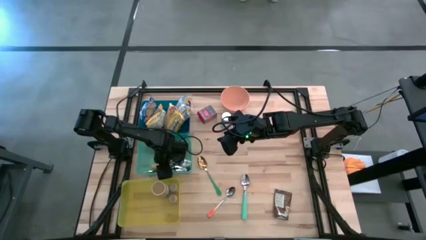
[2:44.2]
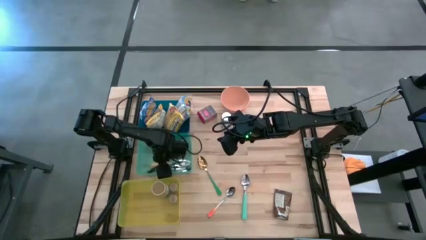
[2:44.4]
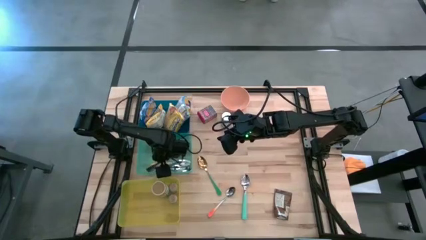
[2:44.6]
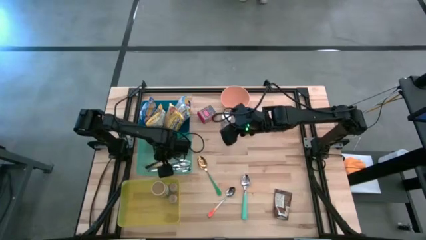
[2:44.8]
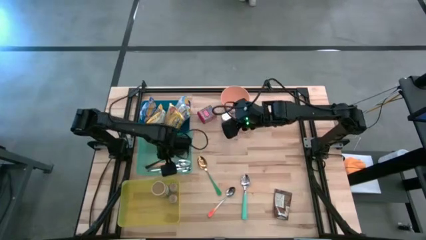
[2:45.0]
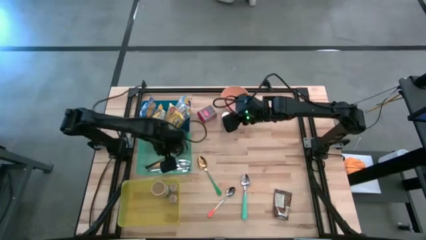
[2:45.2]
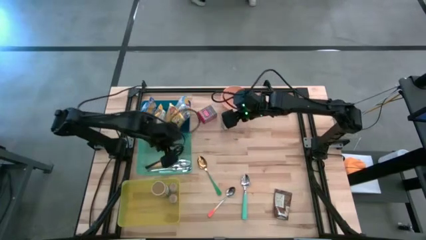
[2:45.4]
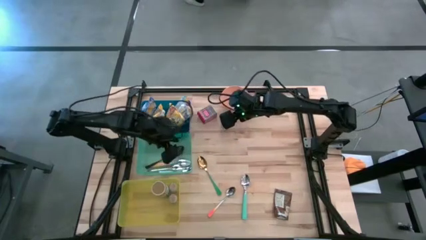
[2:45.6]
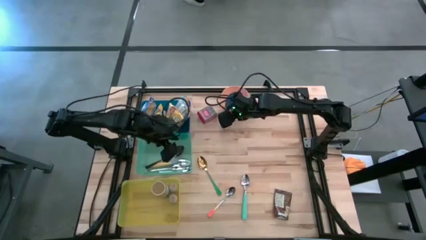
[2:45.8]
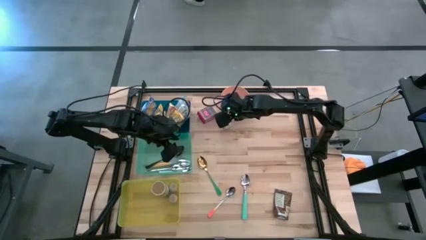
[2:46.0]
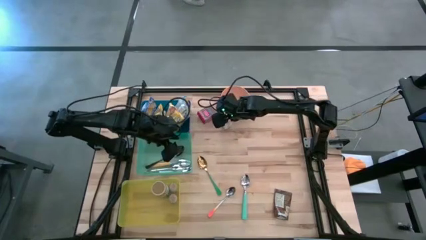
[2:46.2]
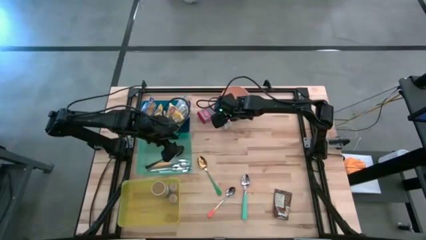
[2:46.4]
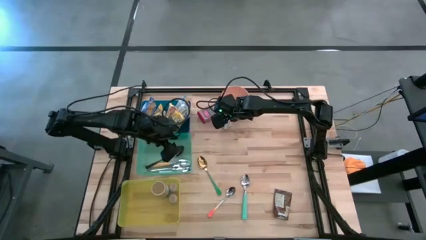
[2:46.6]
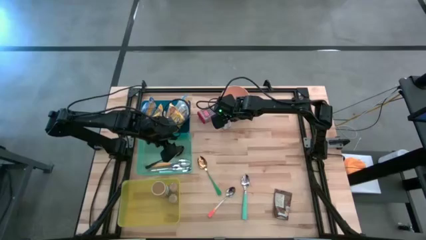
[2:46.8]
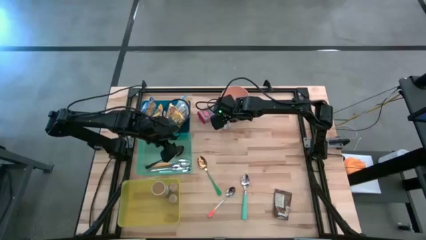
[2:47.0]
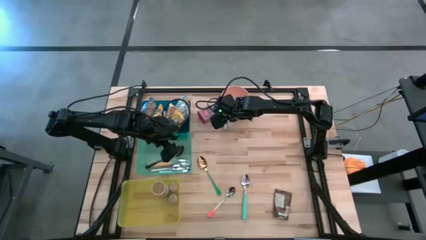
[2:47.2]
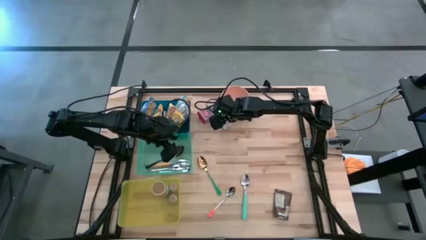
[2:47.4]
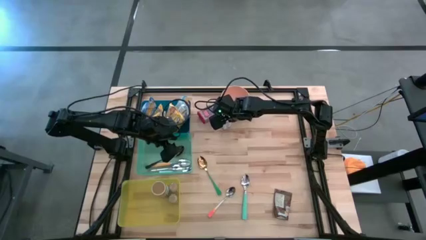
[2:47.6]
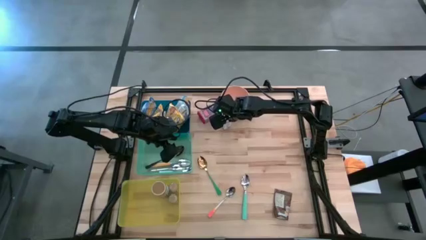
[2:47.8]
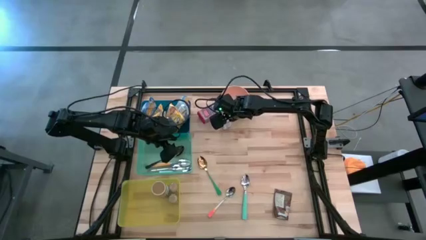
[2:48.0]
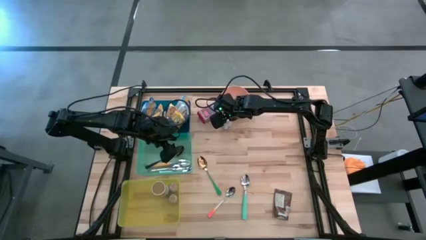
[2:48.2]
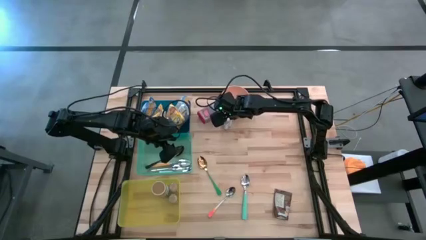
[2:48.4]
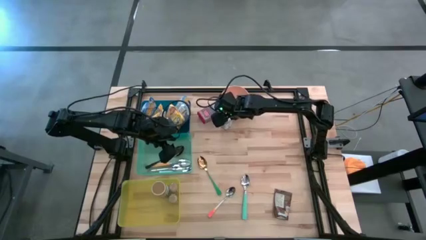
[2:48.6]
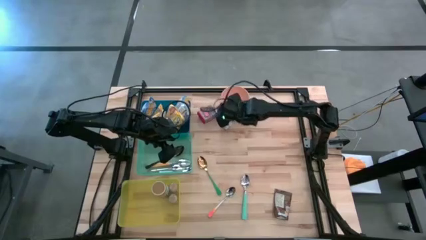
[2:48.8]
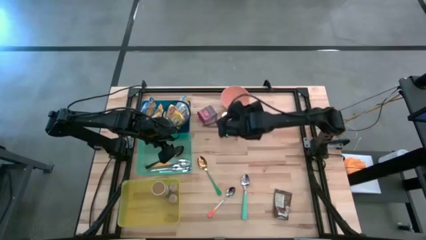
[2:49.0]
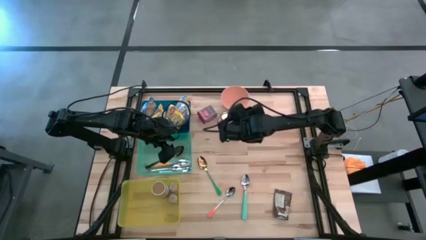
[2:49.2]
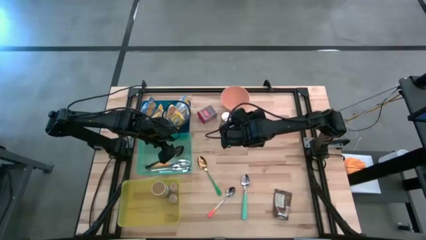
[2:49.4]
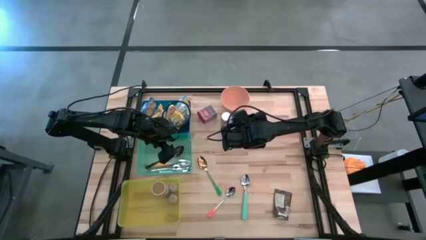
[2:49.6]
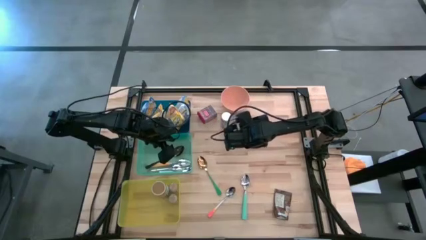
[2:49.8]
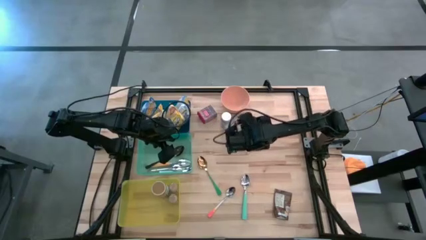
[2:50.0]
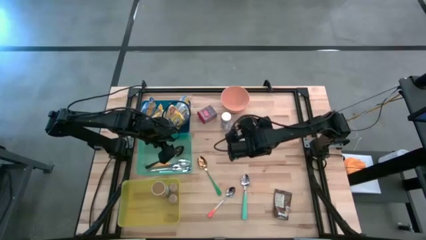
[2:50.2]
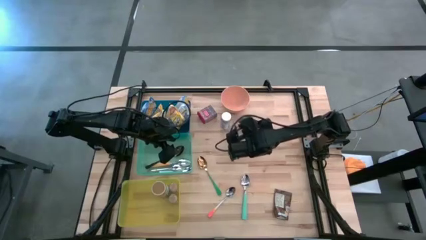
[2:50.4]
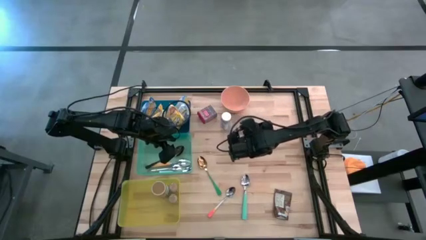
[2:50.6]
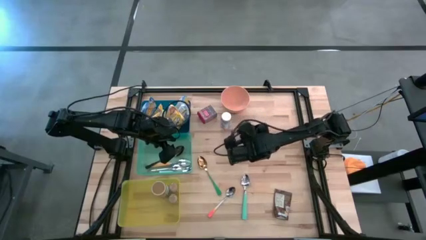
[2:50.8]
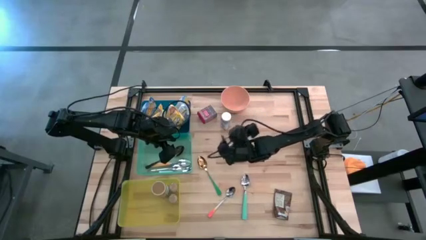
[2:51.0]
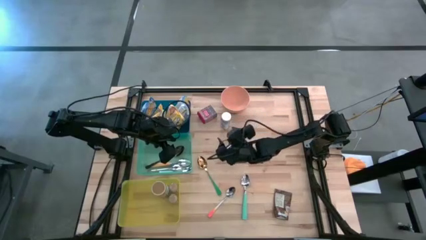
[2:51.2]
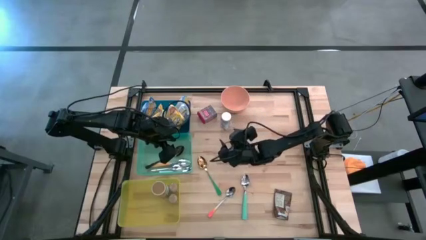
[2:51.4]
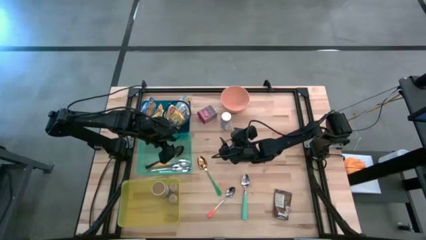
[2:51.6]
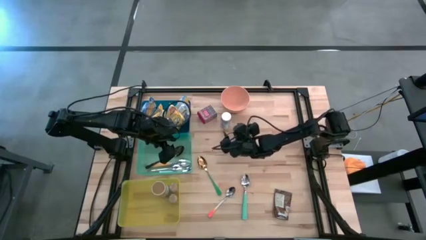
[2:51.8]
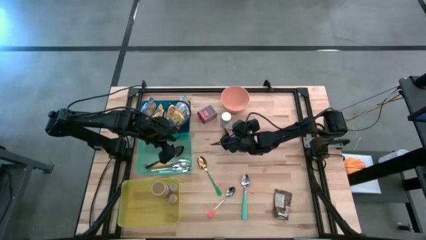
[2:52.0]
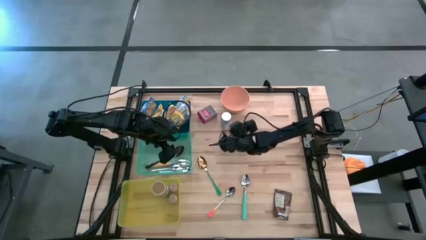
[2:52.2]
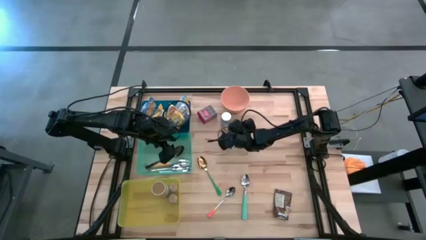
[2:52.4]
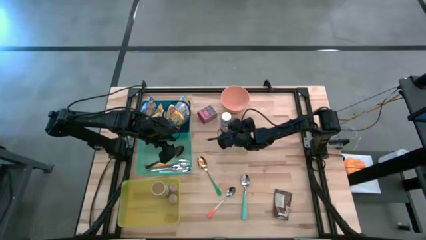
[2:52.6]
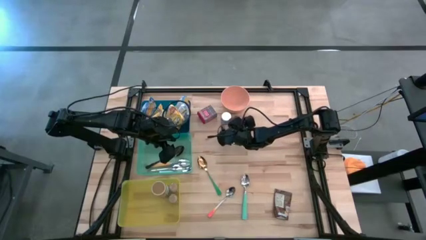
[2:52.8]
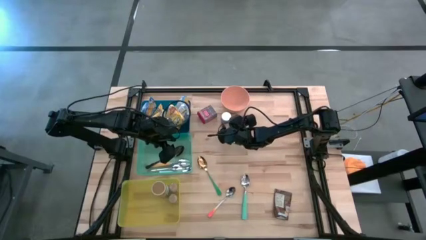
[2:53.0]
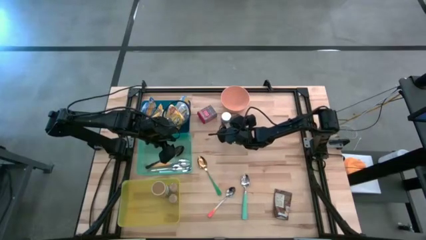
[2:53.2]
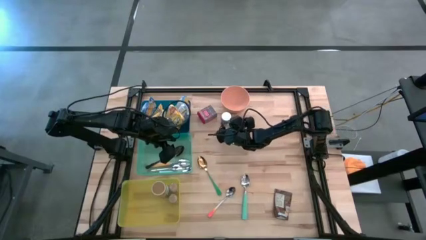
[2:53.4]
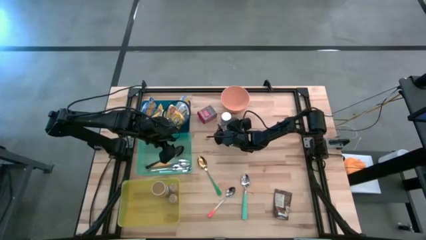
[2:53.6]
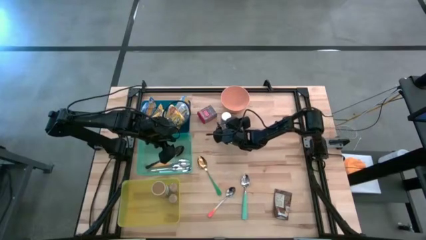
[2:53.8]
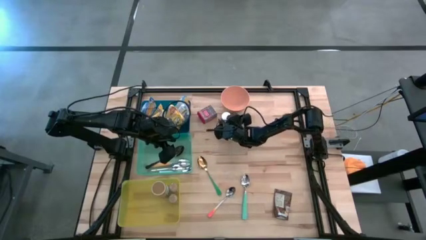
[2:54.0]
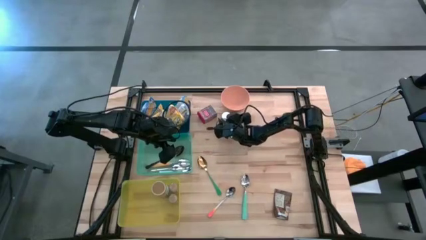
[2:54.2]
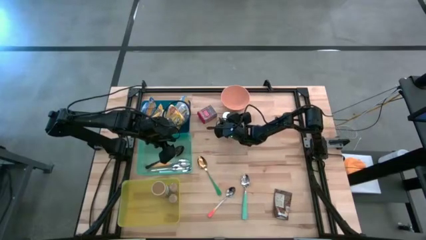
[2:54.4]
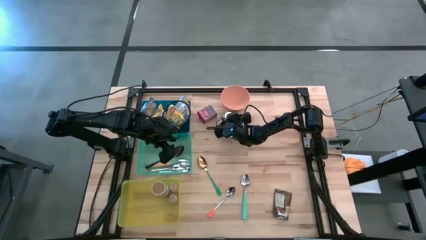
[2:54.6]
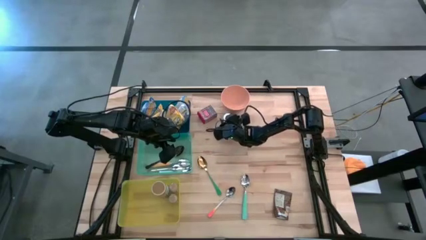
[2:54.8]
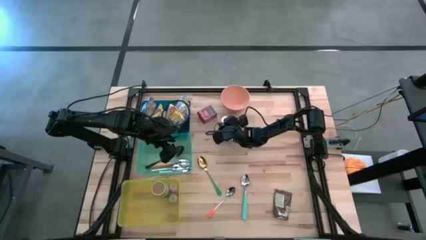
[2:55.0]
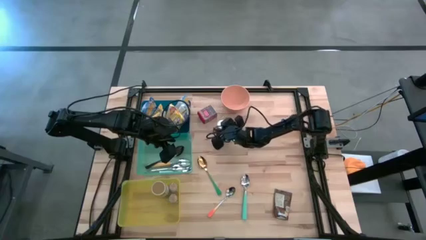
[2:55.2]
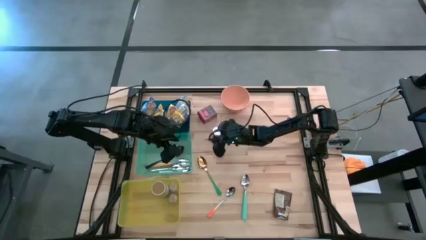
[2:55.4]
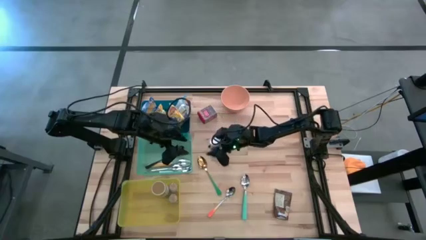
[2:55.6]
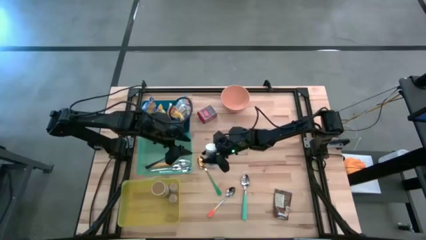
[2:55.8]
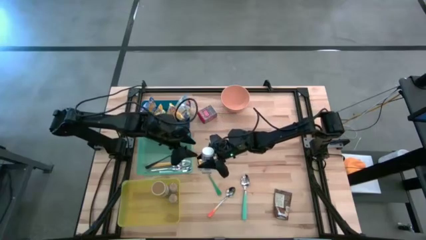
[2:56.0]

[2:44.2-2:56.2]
Put the white seasoning bottle into the yellow bin
